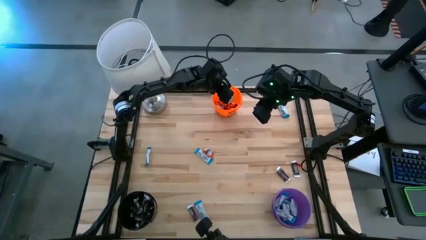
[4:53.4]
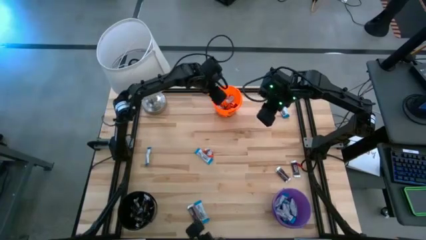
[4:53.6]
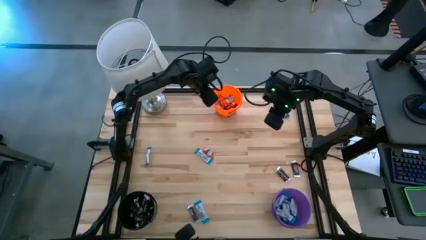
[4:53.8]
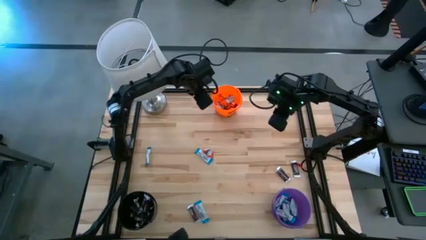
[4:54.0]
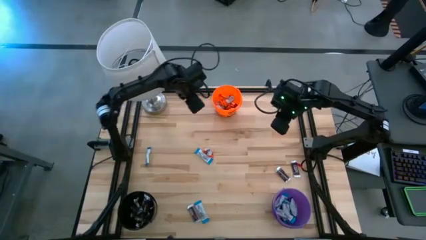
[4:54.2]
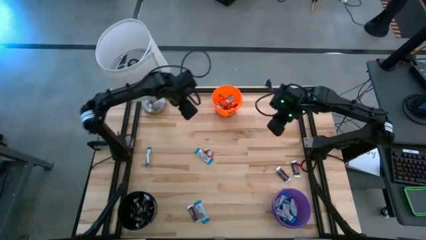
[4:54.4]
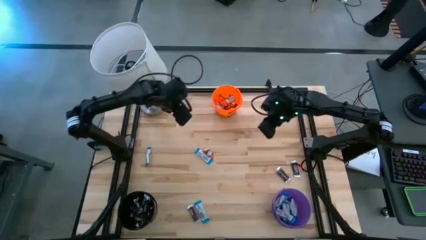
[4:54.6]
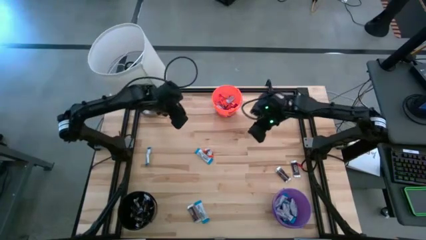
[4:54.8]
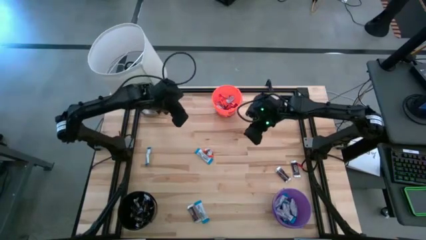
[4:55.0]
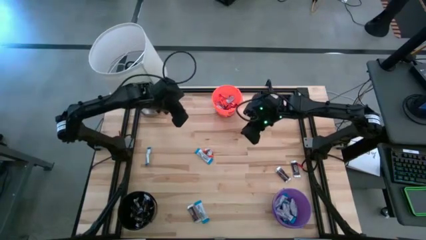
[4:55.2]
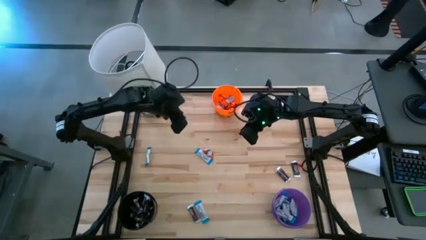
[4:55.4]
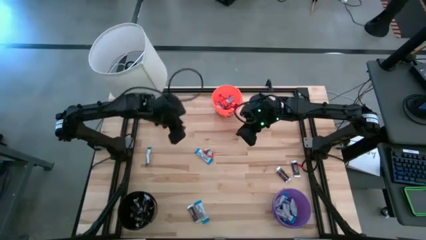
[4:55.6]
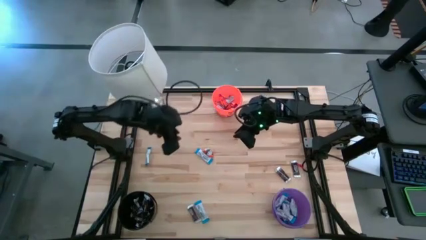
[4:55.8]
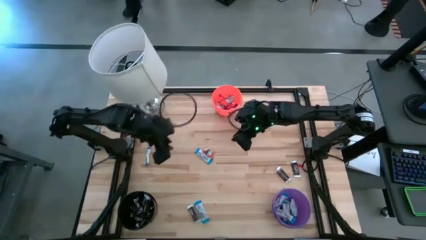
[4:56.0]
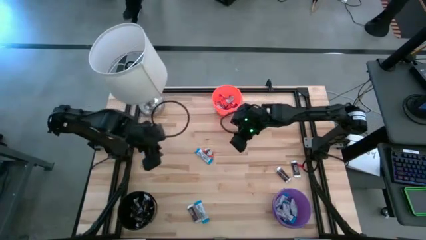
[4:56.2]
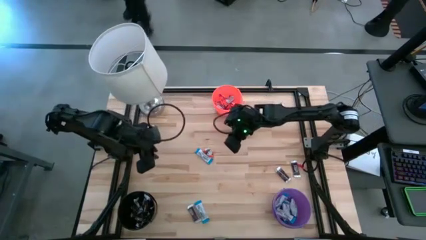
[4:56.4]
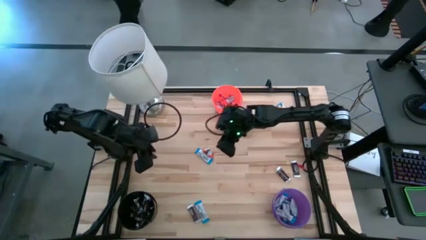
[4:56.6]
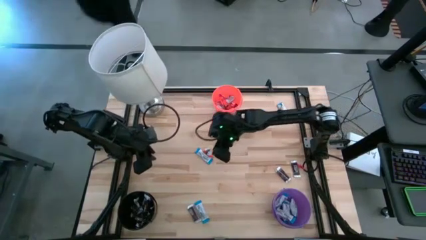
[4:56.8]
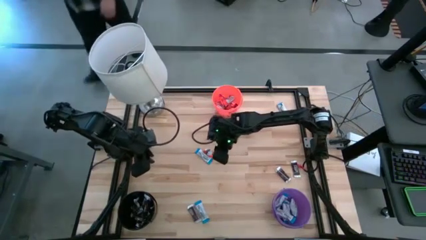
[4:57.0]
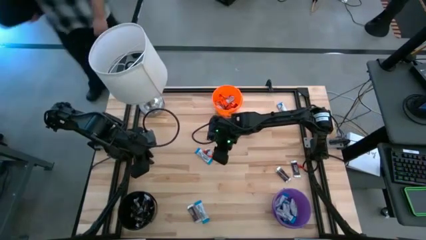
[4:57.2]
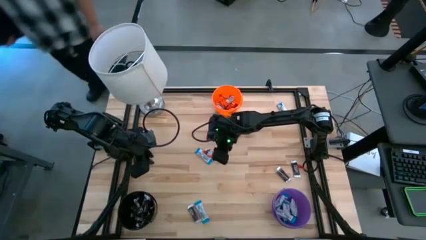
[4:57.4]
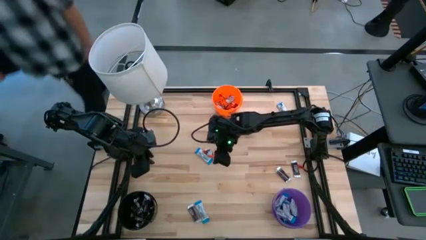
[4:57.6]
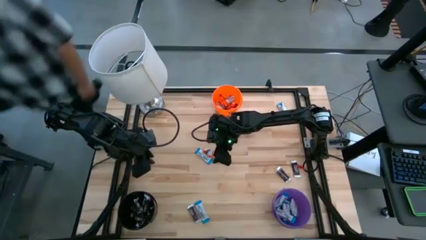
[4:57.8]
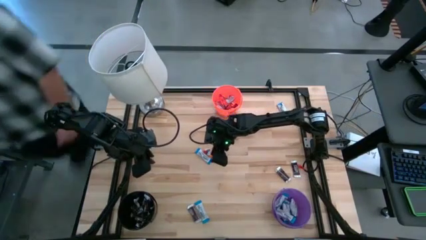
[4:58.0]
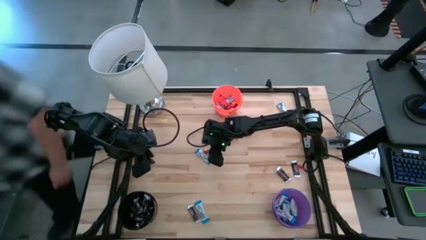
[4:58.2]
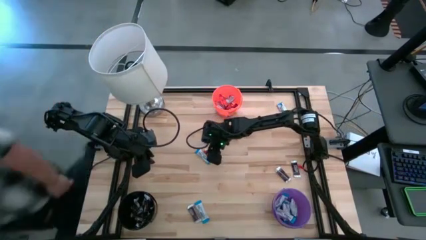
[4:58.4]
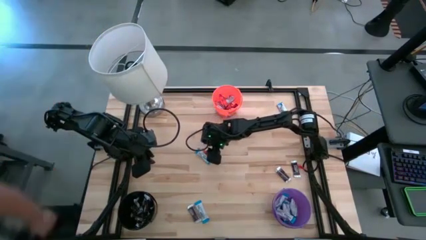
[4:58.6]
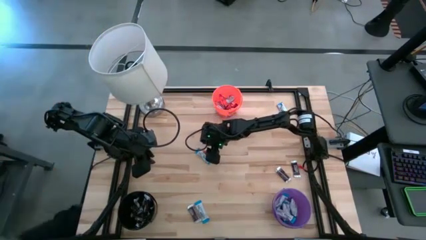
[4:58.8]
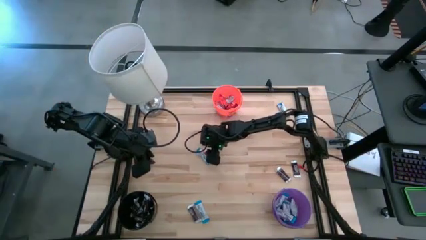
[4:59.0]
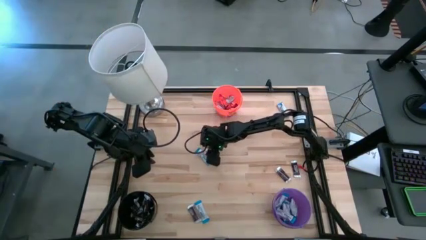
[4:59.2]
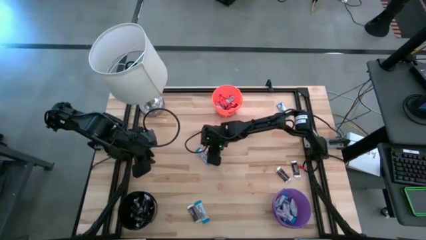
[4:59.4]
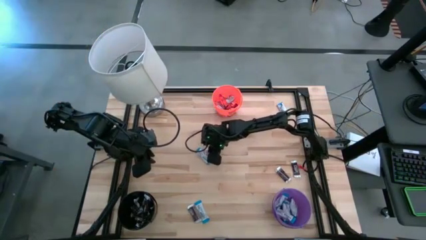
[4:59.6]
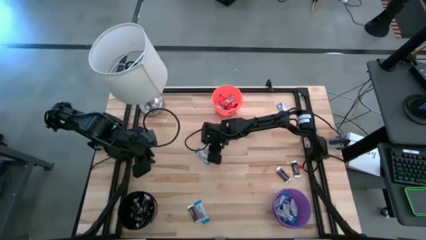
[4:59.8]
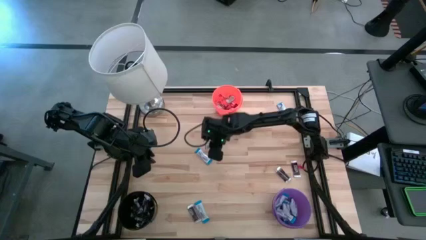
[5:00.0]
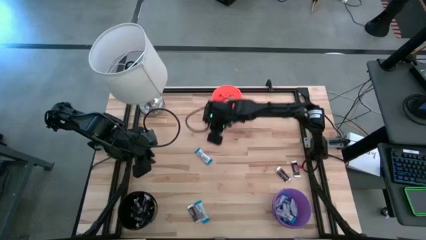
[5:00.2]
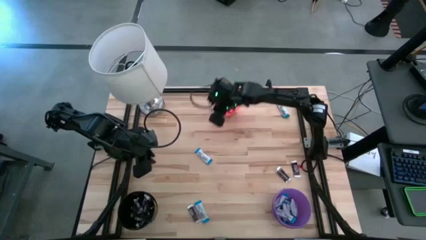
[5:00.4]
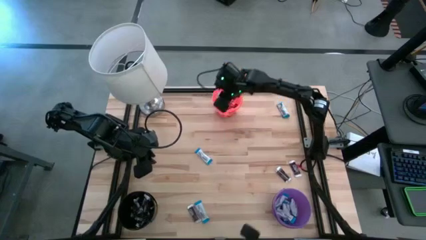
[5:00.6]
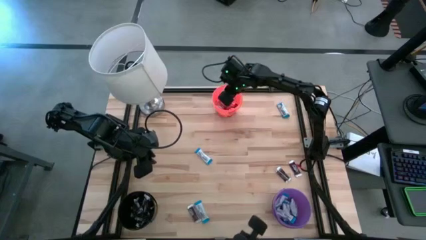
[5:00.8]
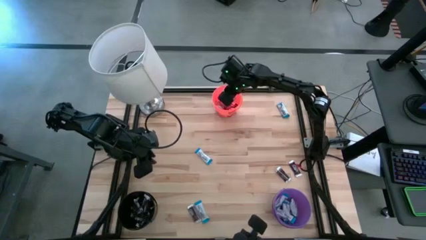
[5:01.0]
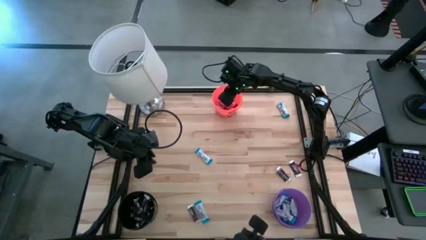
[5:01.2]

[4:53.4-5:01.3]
Task: Organize candy in baskets
Put the orange chocolate into the orange bucket

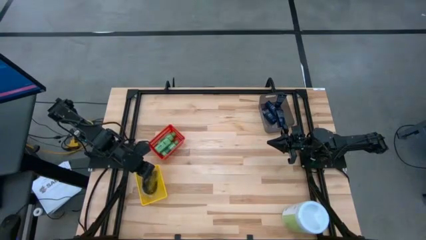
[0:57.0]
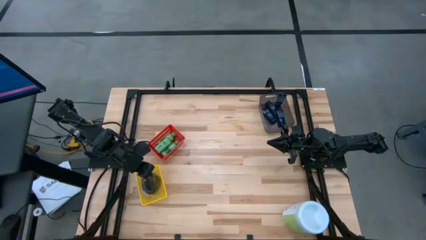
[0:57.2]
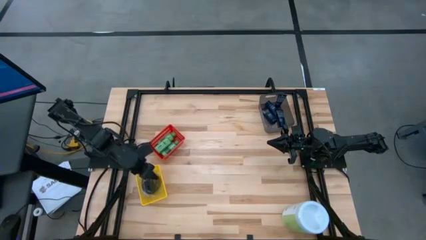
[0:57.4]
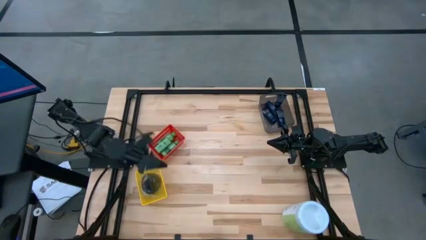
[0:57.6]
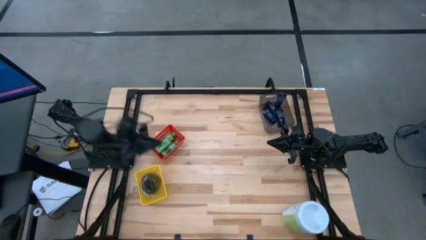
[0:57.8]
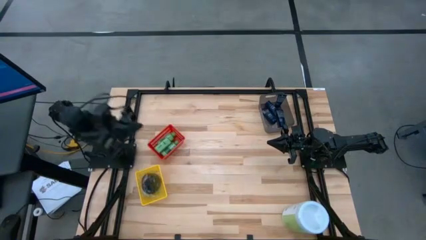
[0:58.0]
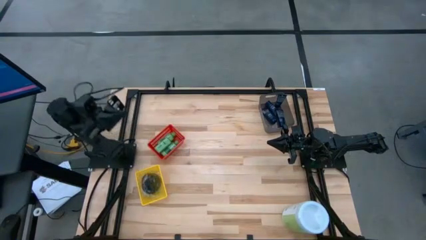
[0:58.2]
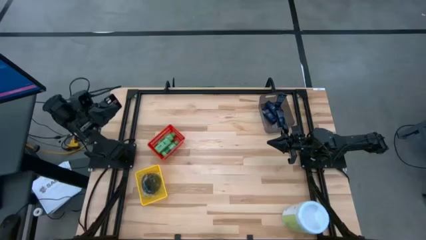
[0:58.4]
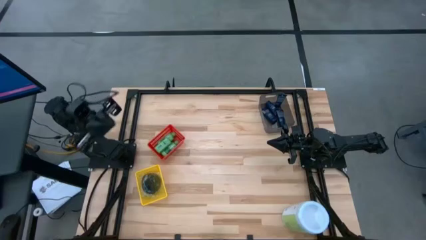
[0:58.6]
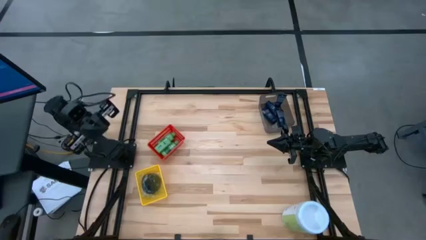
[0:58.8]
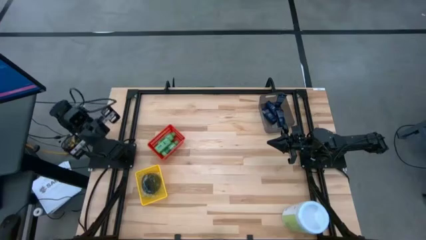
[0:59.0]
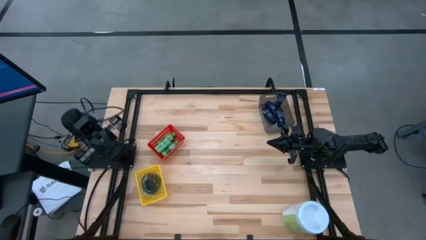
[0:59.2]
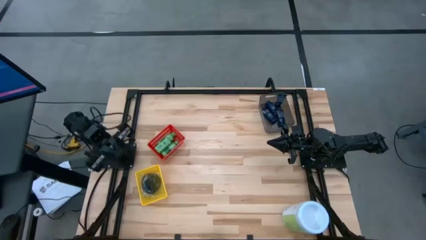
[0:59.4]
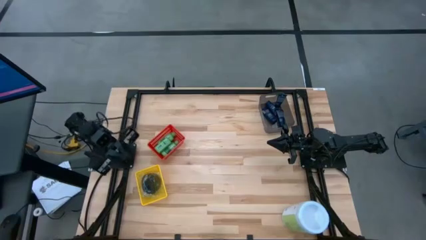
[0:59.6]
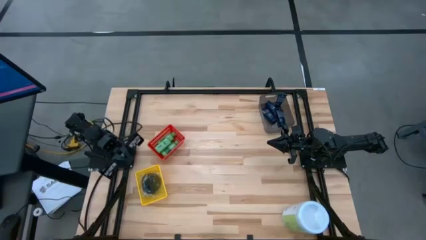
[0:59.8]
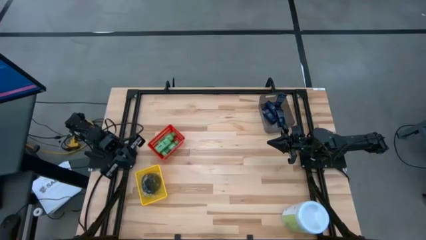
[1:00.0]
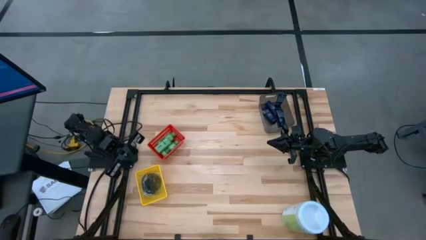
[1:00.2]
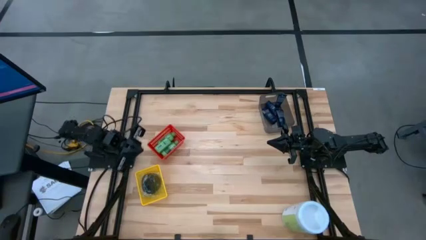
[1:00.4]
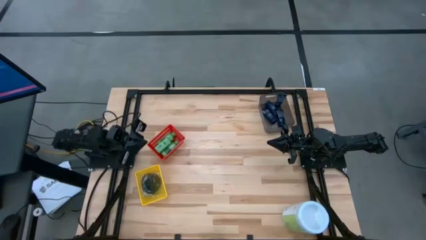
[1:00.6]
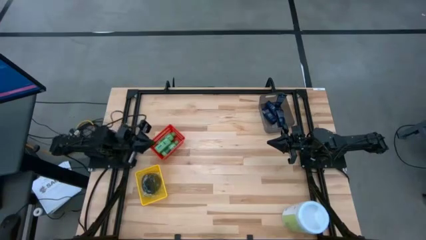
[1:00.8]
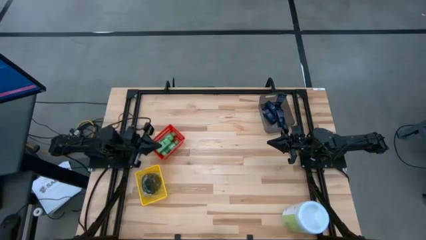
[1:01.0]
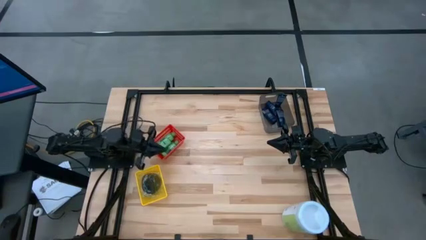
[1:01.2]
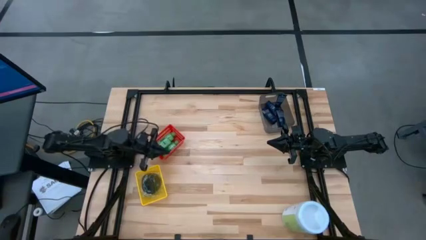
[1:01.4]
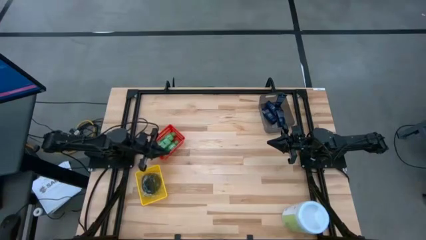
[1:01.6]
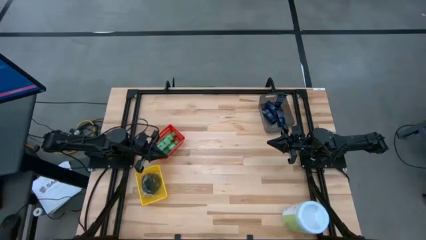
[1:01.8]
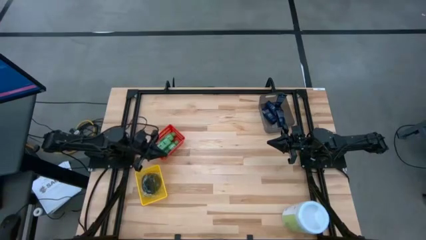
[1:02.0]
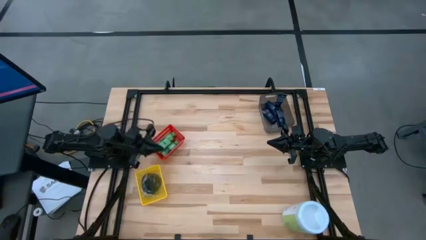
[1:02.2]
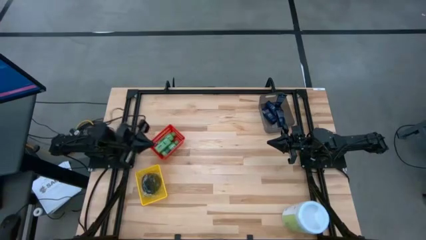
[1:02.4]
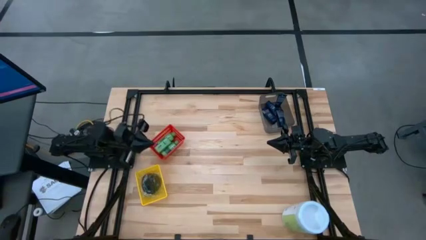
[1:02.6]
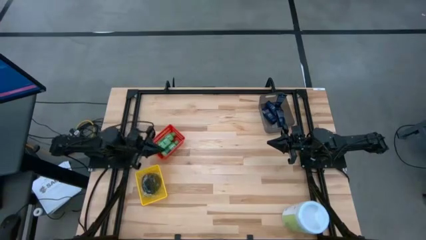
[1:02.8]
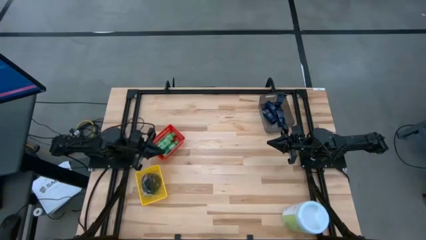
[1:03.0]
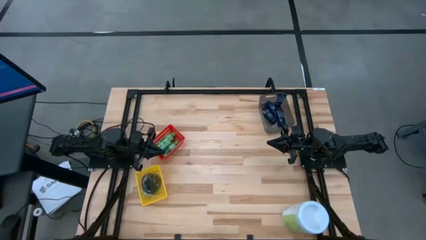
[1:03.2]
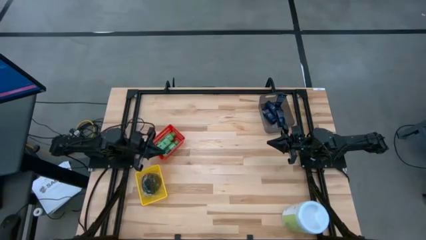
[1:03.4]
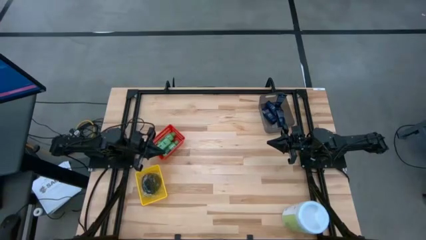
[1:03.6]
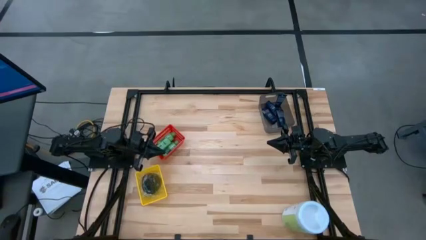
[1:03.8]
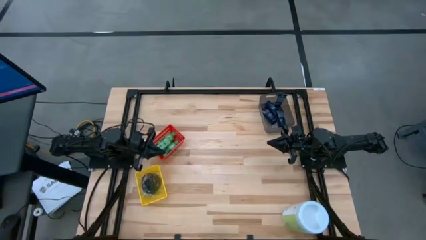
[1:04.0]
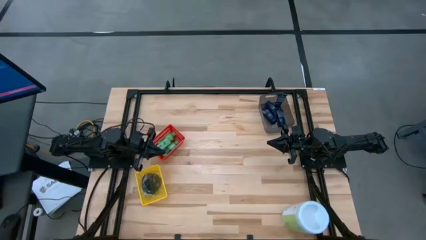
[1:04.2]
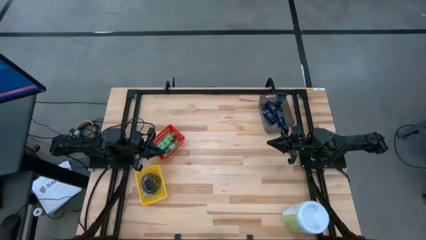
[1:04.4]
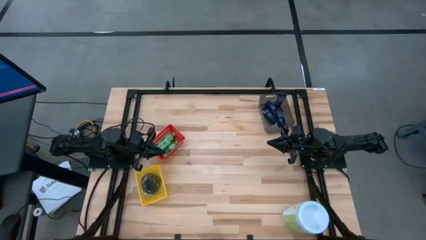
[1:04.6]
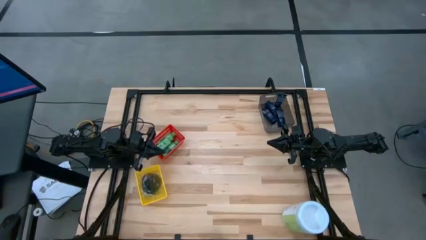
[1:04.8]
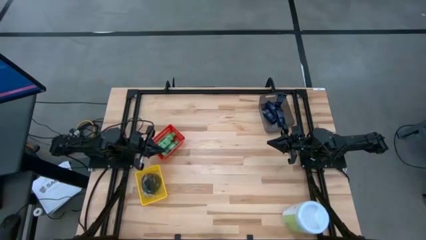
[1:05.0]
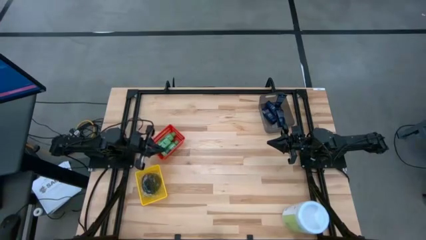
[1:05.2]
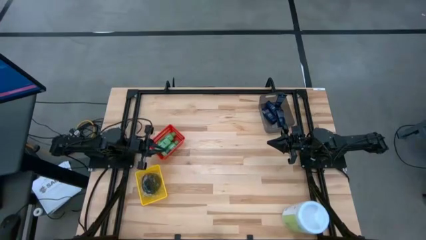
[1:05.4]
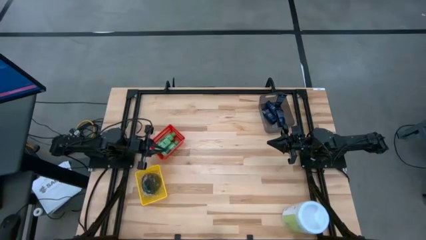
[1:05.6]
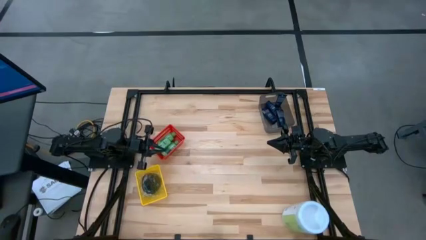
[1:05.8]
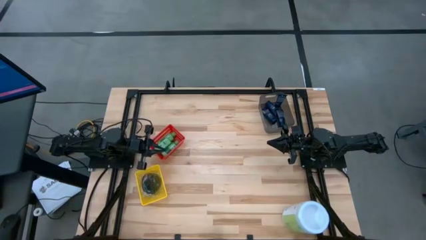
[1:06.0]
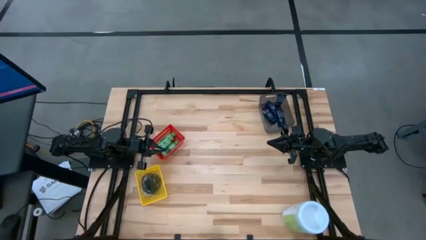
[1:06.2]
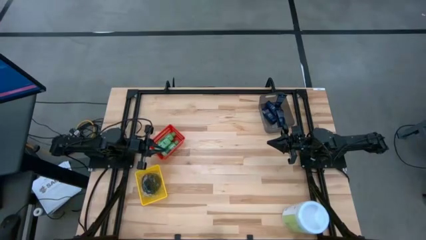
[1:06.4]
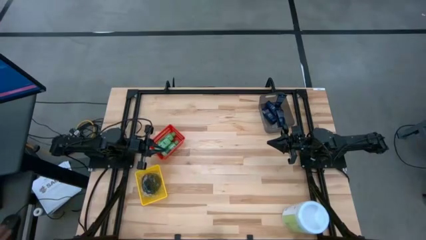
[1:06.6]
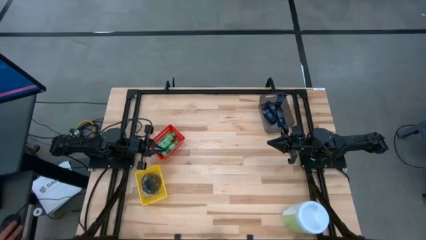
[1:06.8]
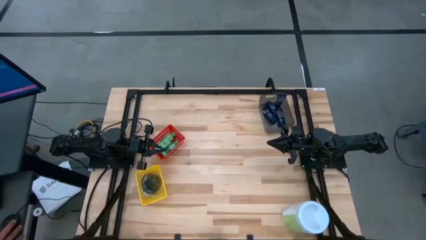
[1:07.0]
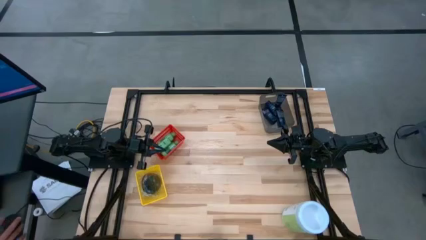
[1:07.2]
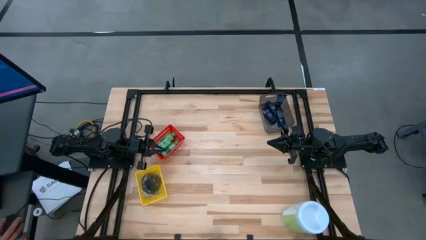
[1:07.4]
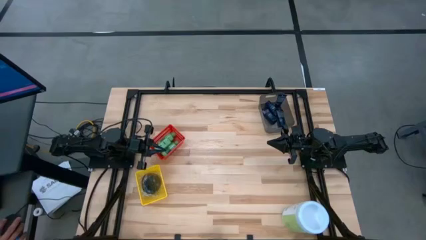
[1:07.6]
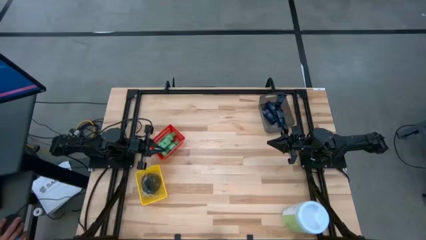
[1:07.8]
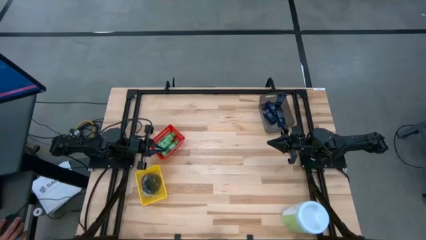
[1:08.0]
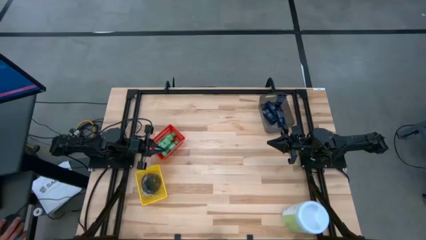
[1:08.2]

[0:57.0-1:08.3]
Task: Pick & Place Travel size toiletries
Return to Home Position
